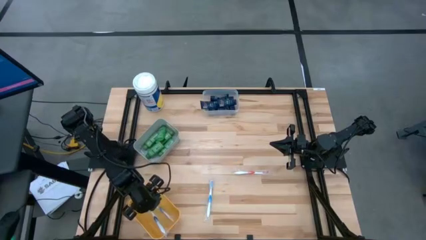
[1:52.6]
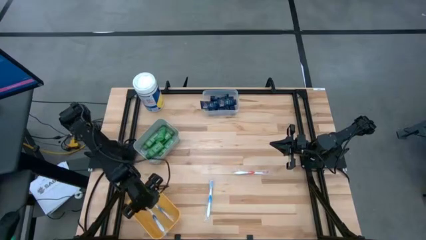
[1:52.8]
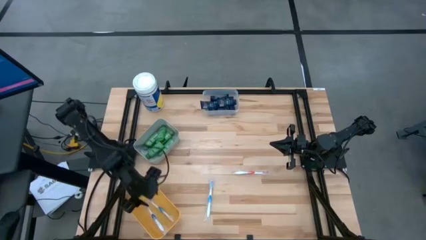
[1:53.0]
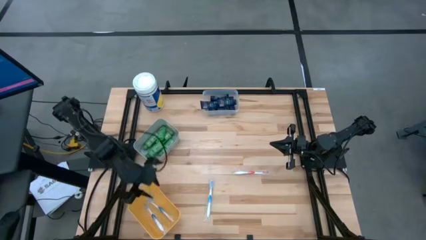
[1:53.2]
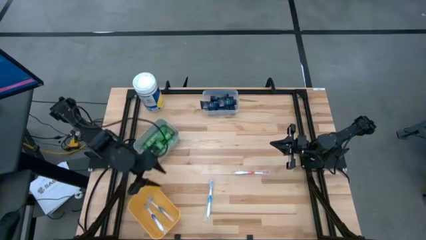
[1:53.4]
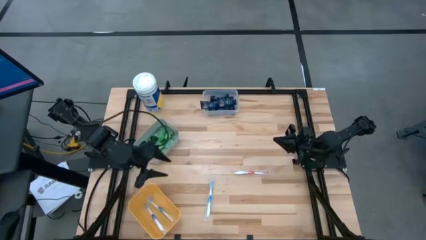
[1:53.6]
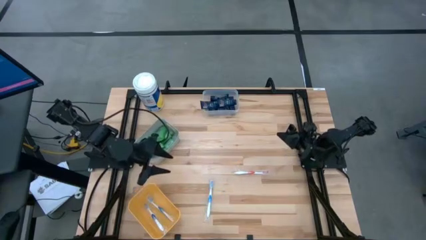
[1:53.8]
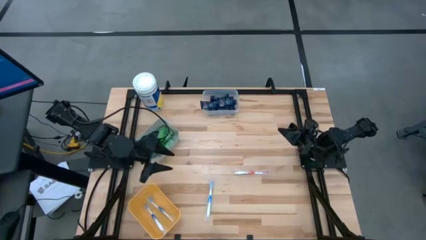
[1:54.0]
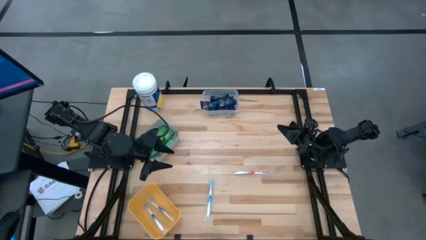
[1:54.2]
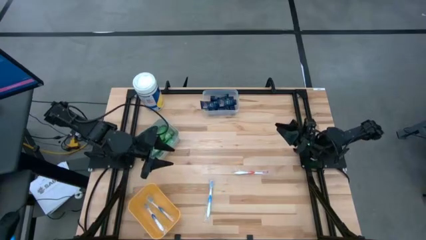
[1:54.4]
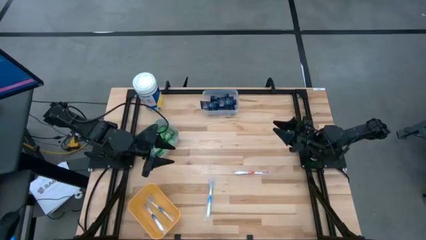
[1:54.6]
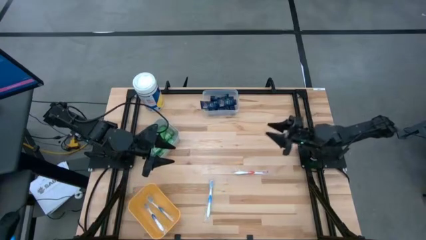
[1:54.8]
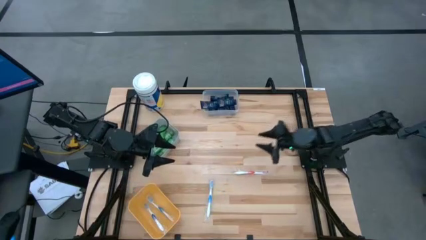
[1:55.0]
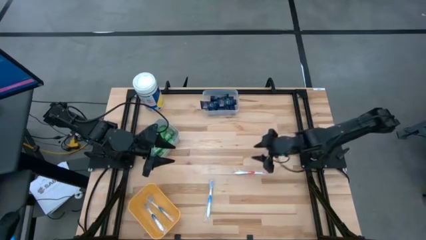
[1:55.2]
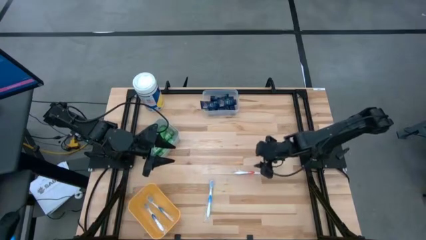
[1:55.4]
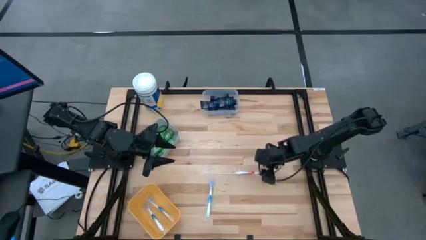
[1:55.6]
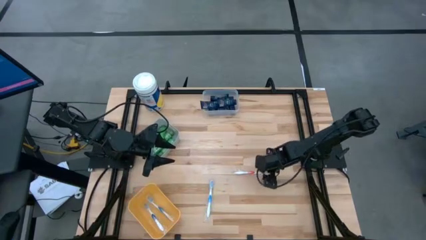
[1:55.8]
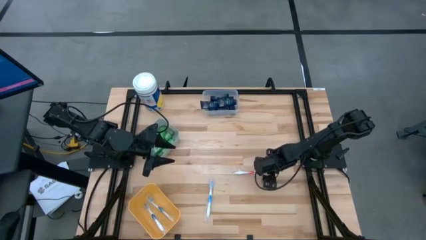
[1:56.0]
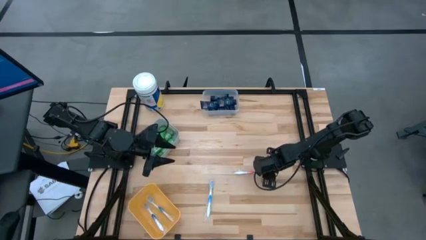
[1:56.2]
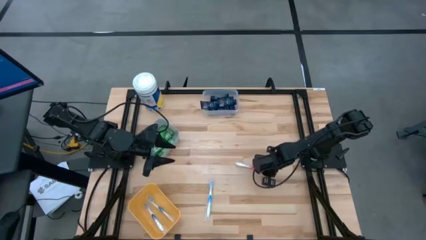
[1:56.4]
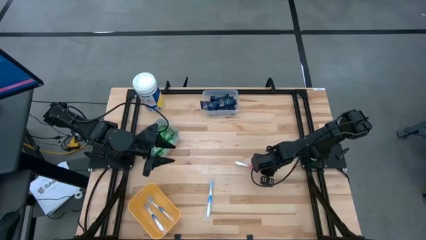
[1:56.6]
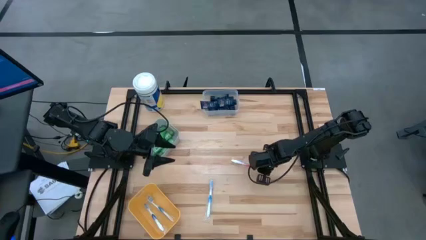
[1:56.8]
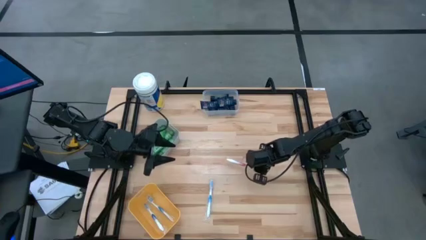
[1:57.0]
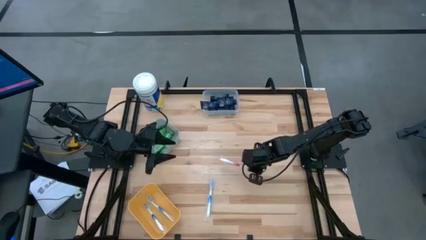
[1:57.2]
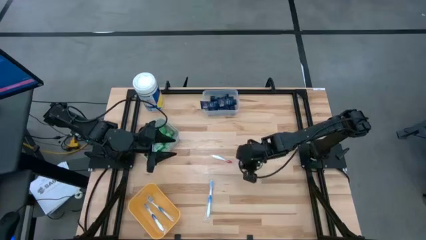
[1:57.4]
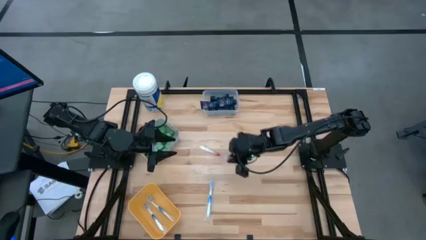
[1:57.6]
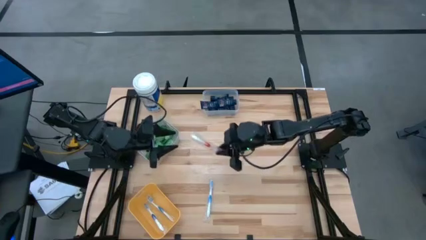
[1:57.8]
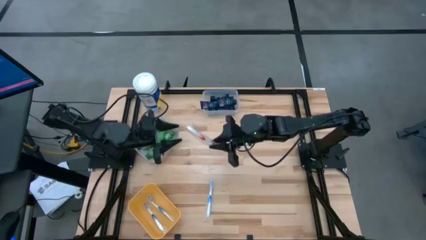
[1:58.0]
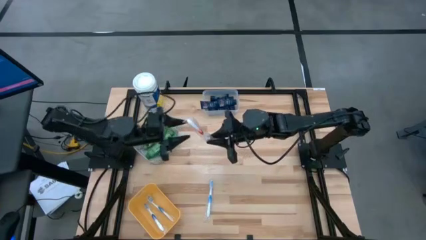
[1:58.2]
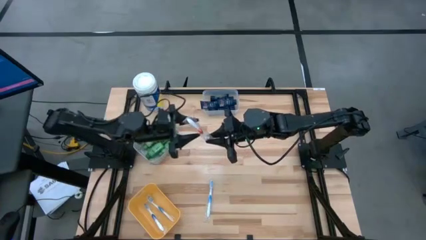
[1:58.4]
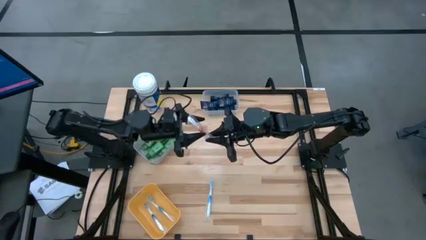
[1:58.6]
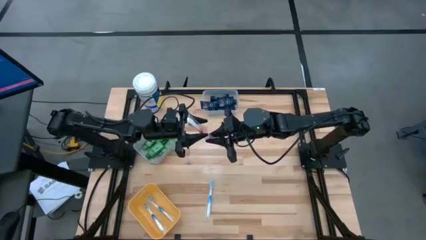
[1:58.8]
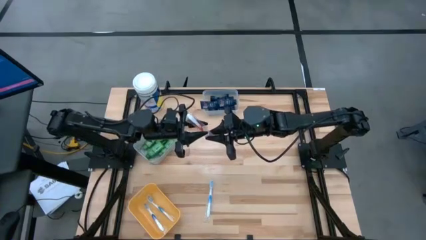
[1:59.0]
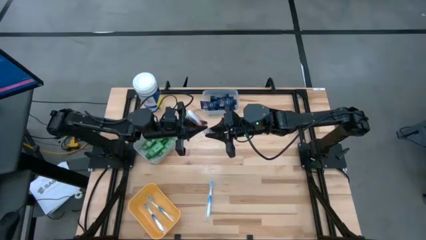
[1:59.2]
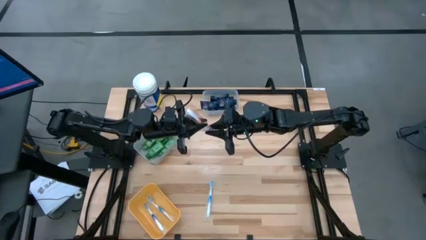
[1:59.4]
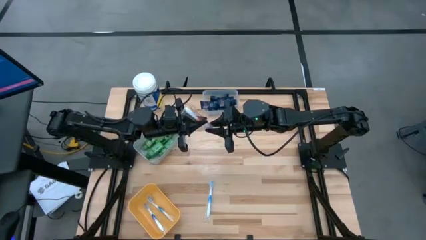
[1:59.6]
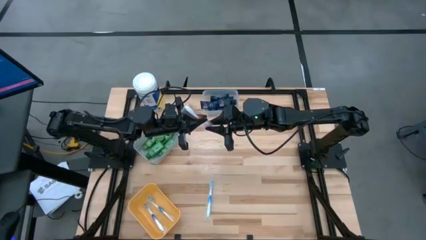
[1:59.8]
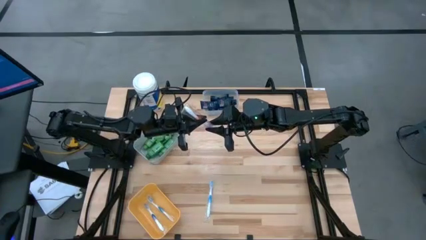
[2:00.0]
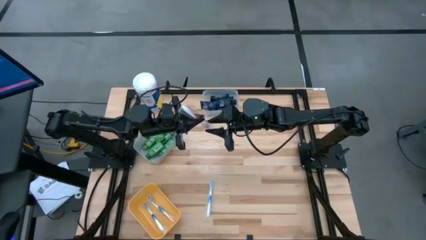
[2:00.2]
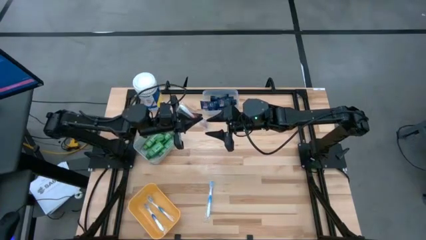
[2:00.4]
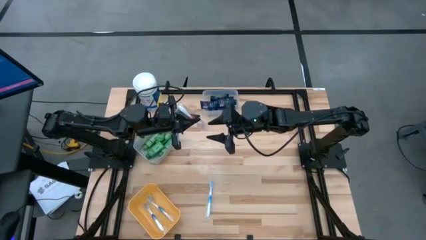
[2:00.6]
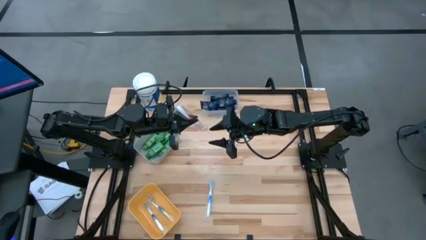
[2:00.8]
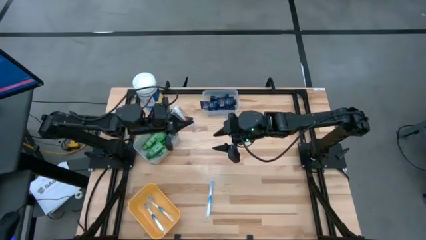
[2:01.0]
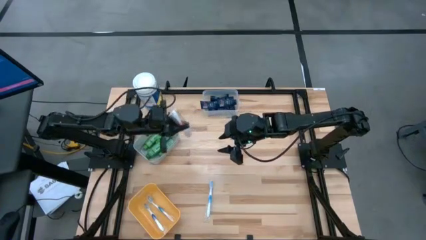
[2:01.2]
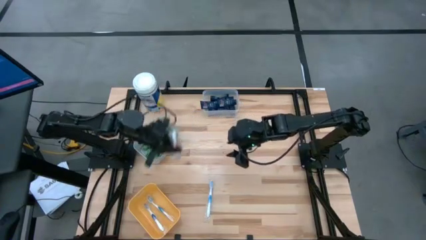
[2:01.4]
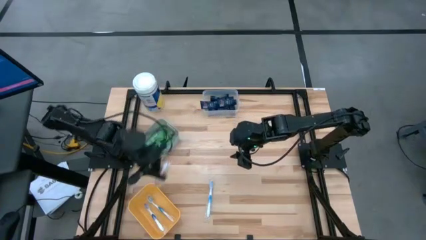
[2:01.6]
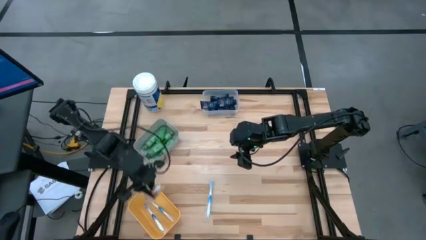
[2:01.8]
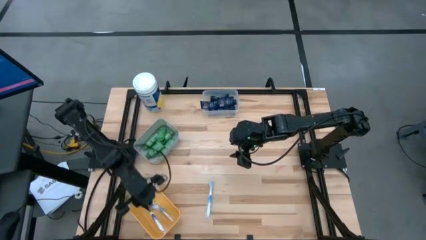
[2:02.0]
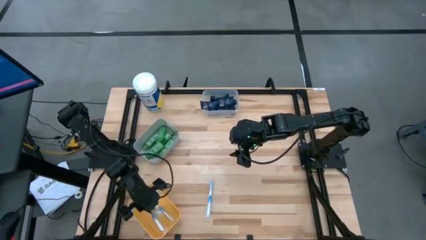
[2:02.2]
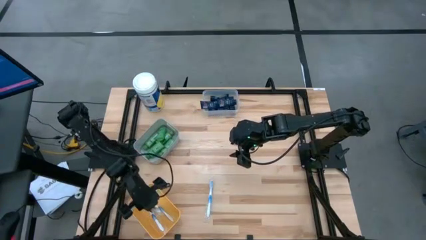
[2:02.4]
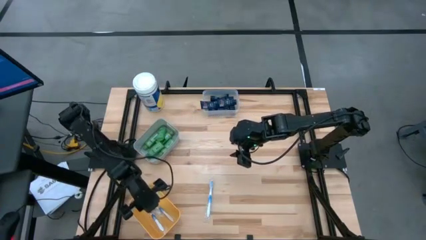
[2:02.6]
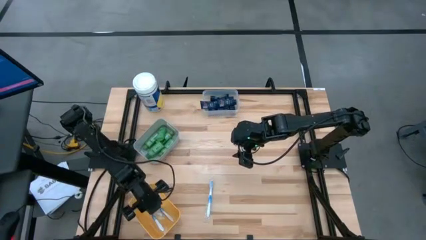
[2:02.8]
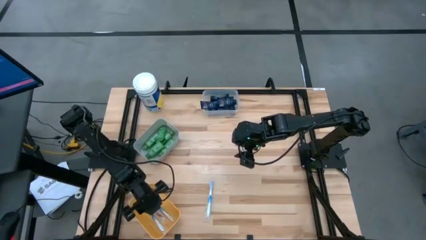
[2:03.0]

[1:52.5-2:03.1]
Task: Pick & Place Travel size toiletries
Put the orange toothbrush into the orange bin

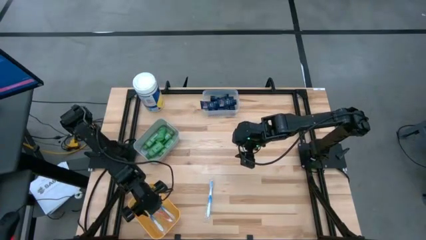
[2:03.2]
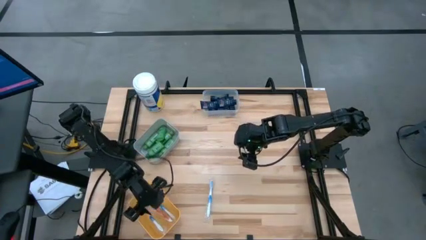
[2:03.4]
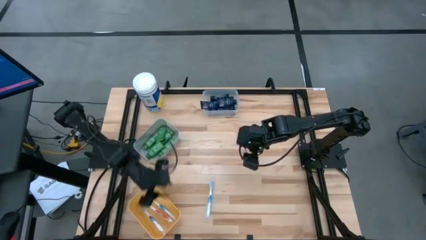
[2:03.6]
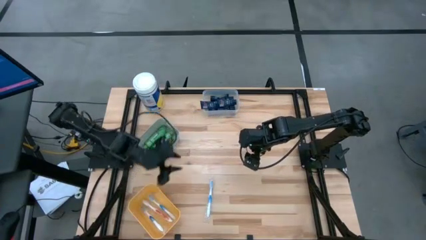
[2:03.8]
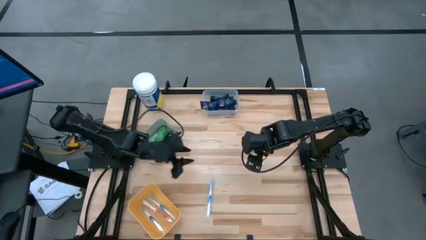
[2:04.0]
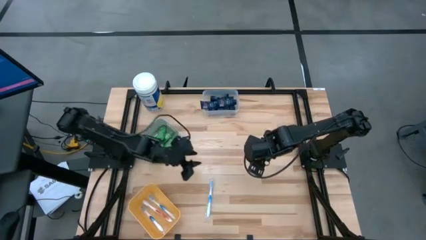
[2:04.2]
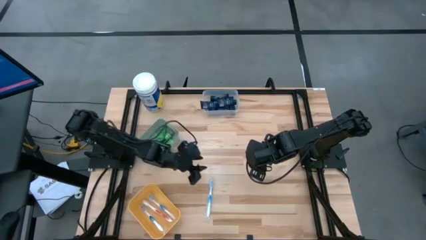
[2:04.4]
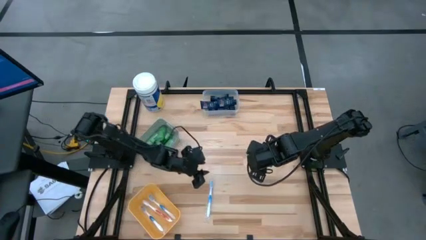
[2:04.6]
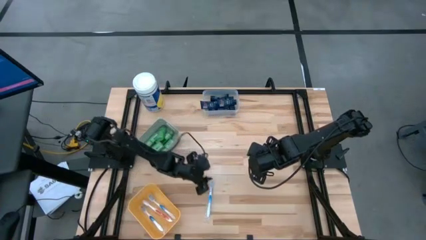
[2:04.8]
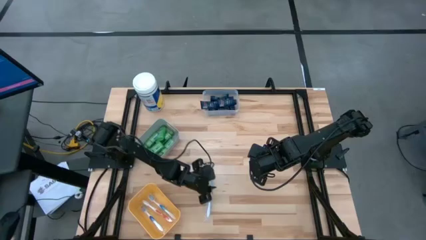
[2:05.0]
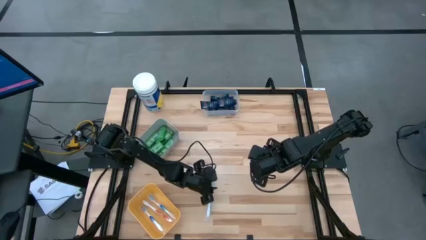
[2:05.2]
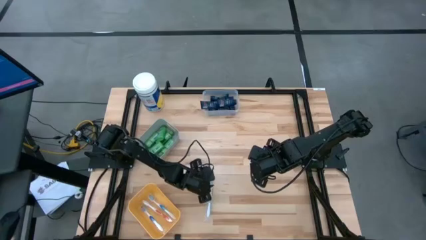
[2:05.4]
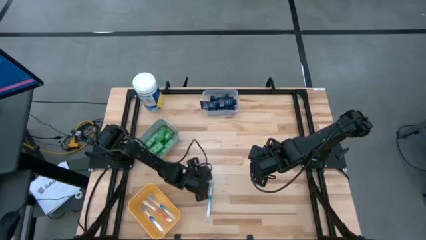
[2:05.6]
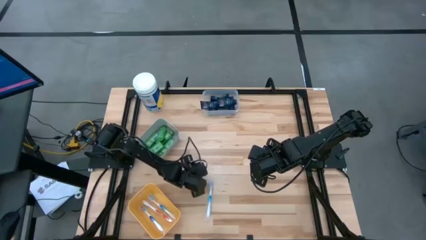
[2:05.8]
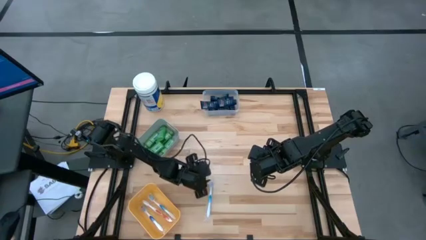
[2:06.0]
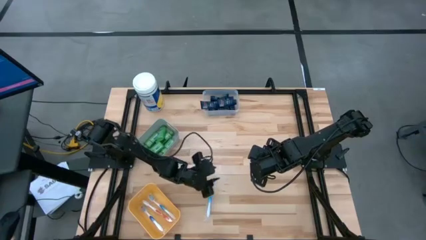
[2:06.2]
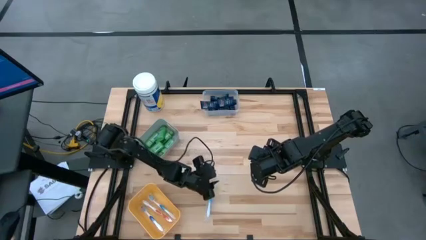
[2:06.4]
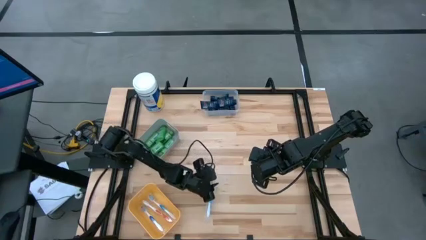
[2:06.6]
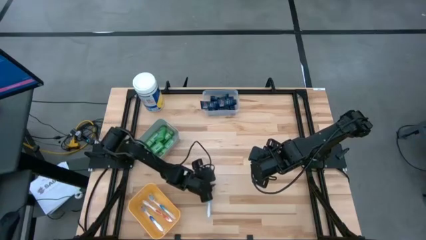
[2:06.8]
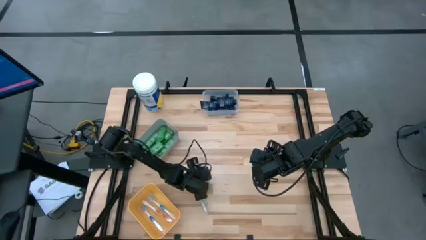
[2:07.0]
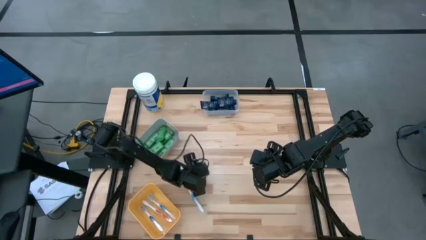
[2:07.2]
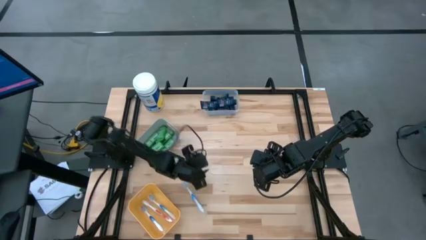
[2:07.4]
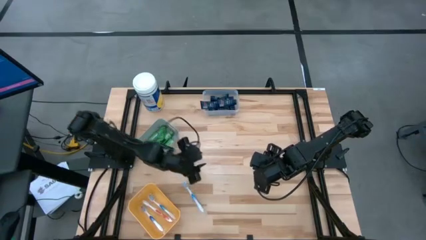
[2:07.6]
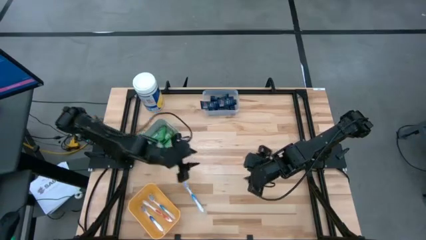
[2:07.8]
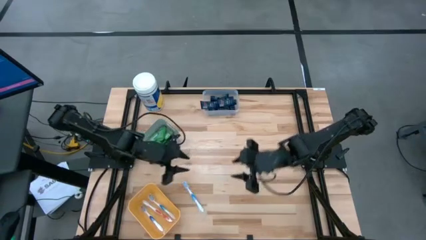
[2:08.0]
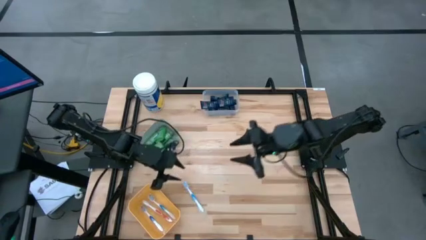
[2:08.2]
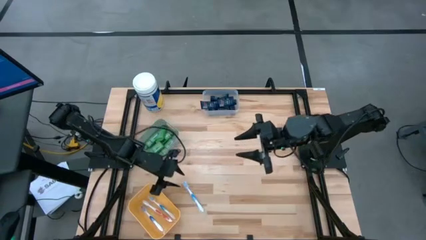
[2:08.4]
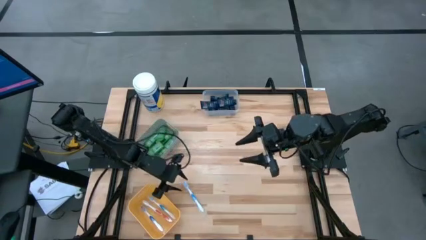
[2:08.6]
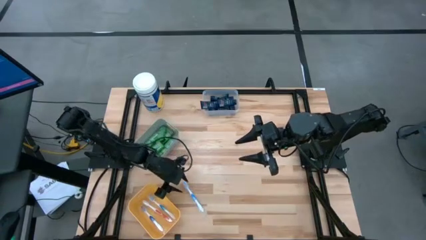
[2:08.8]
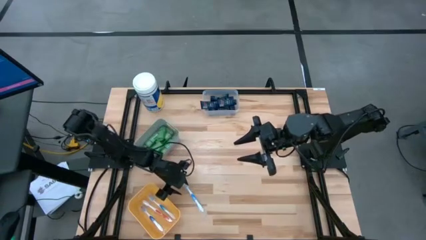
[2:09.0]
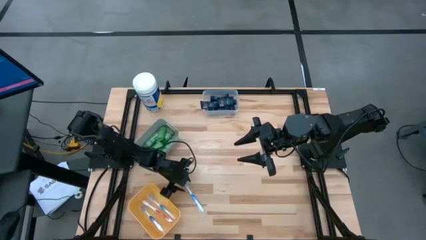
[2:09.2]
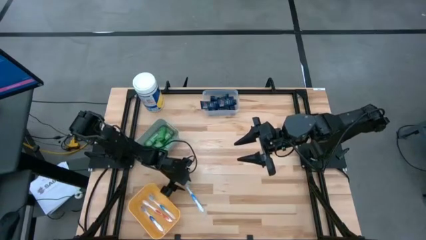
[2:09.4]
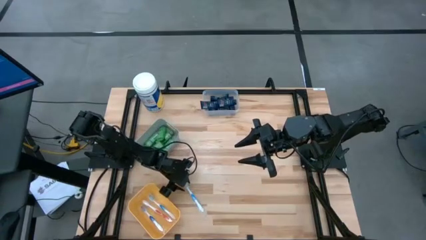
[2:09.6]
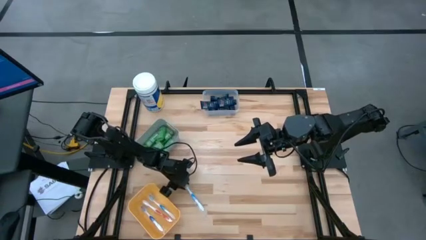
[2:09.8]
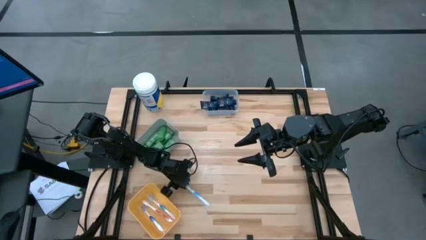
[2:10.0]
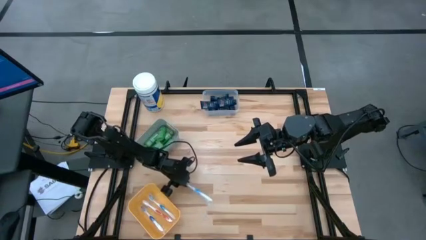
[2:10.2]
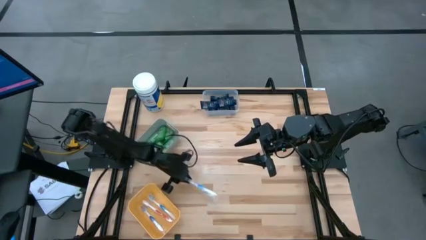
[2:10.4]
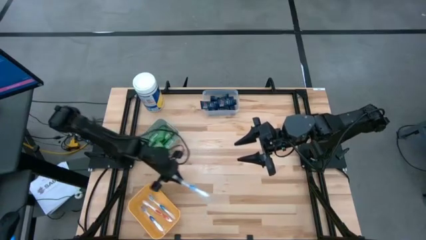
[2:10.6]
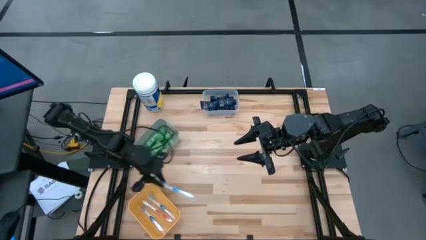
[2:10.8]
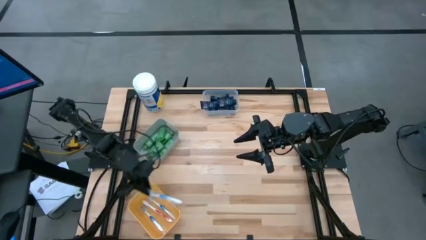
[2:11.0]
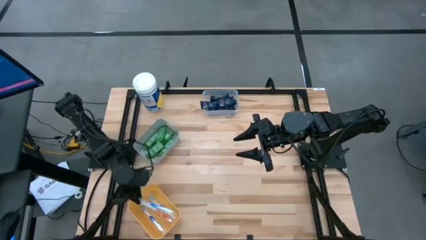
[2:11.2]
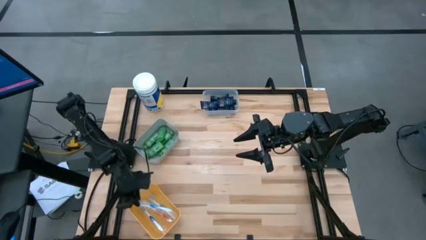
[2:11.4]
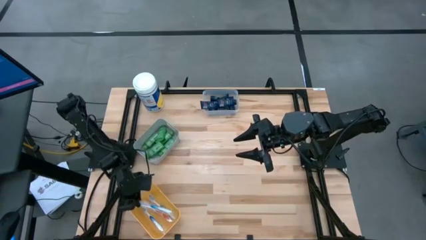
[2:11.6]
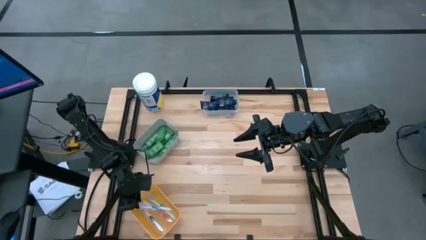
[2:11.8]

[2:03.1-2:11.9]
Put the blue toothbrush into the orange bin
